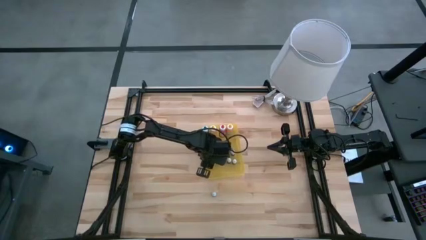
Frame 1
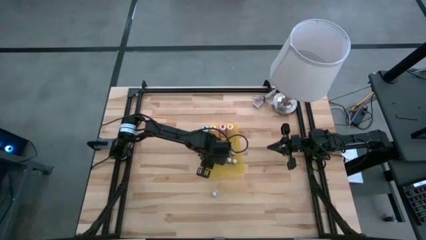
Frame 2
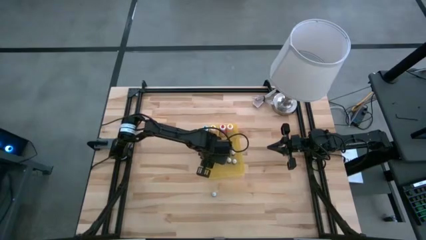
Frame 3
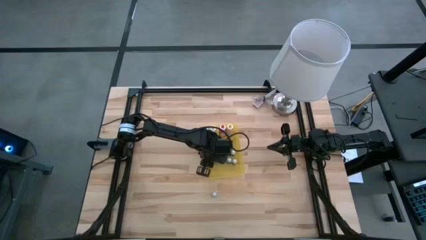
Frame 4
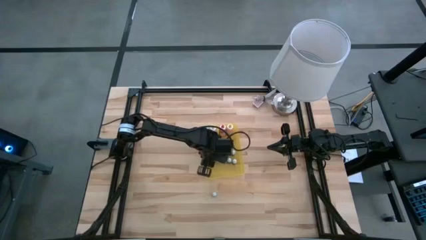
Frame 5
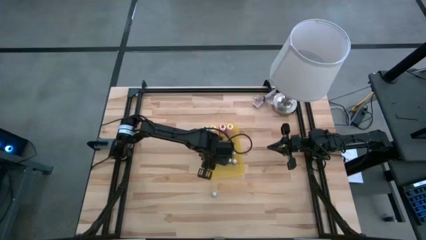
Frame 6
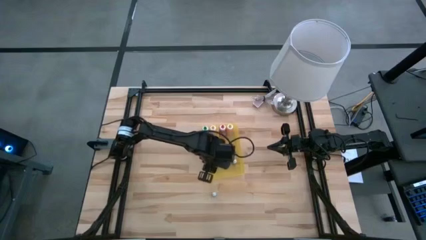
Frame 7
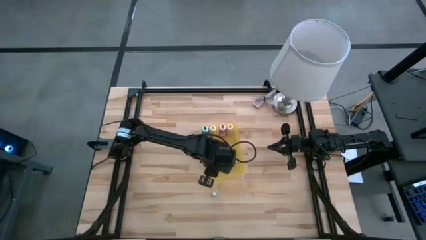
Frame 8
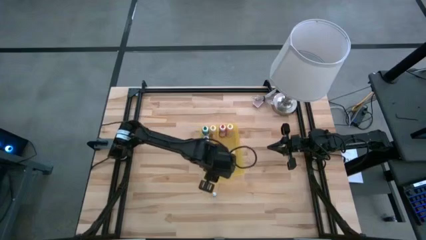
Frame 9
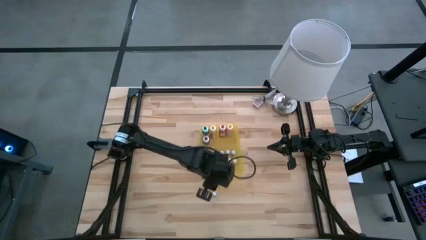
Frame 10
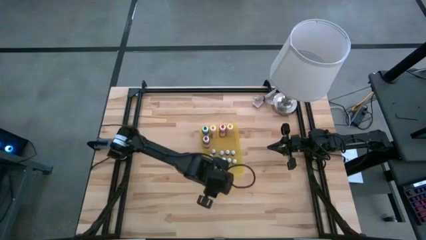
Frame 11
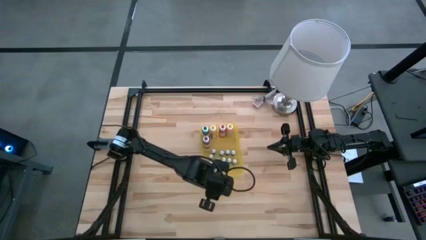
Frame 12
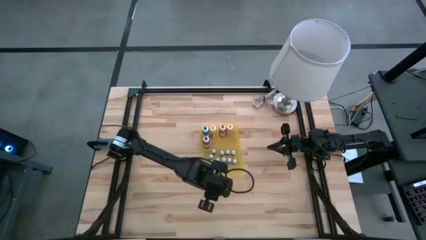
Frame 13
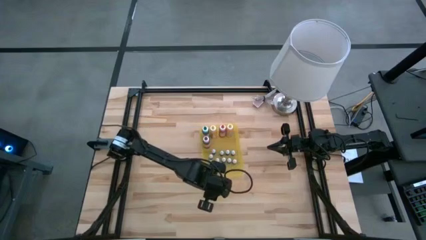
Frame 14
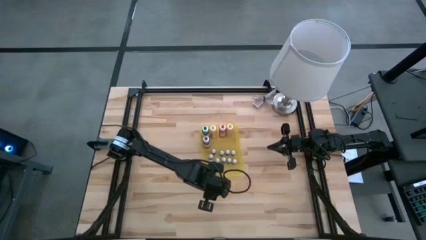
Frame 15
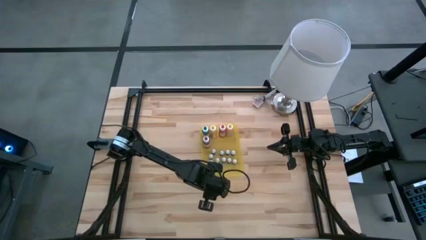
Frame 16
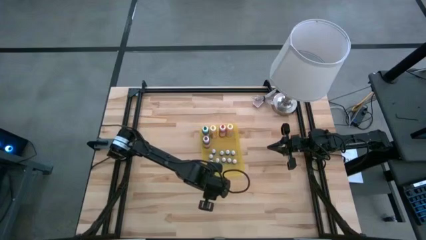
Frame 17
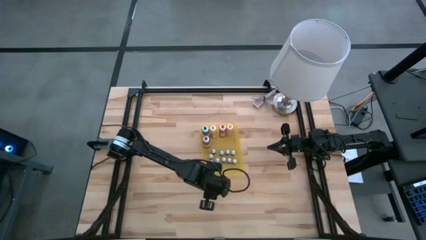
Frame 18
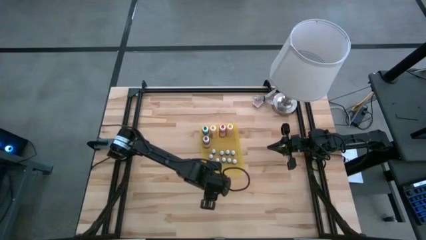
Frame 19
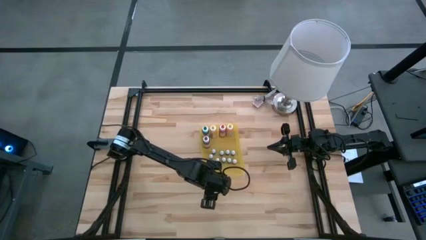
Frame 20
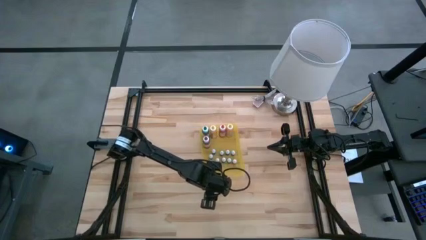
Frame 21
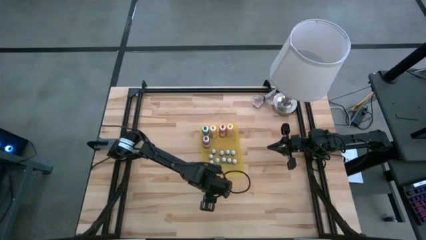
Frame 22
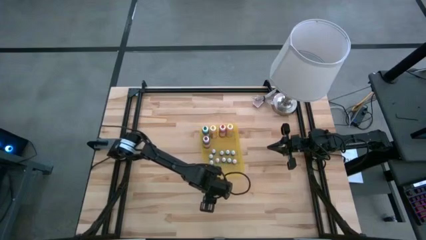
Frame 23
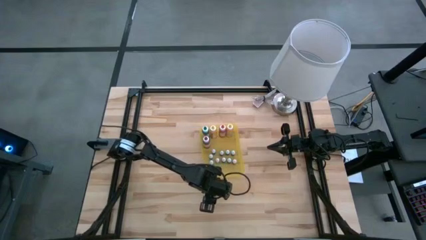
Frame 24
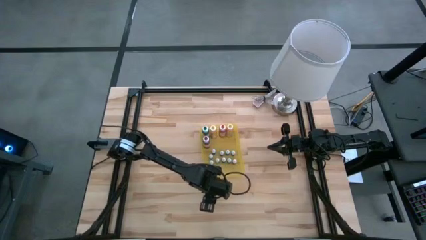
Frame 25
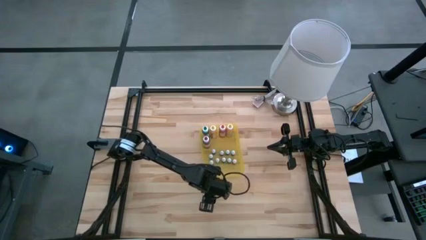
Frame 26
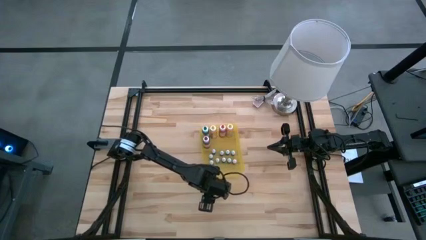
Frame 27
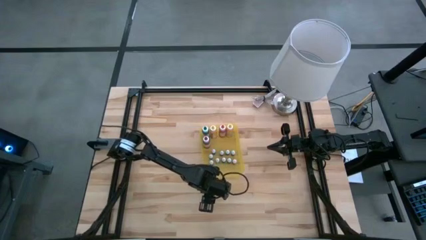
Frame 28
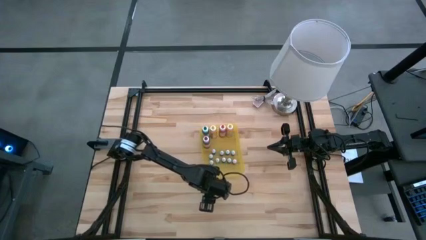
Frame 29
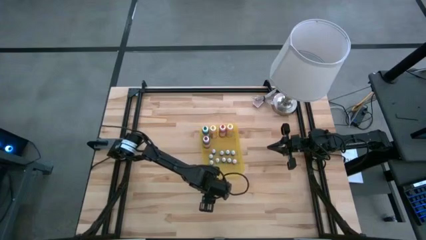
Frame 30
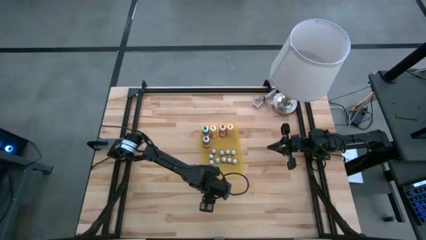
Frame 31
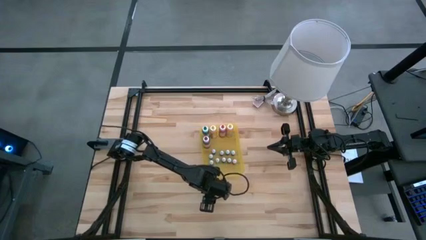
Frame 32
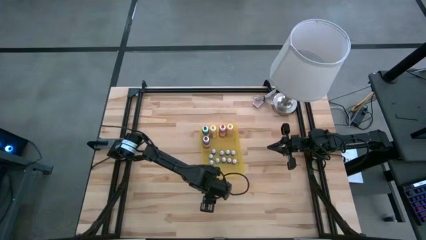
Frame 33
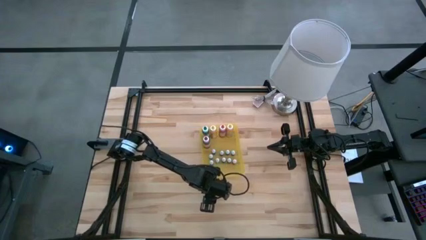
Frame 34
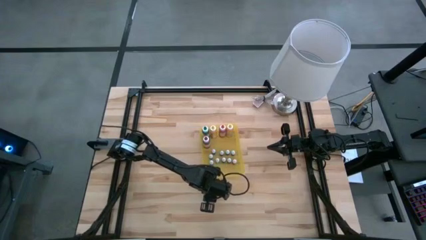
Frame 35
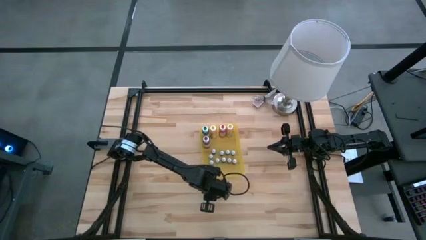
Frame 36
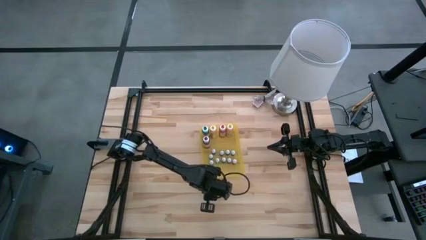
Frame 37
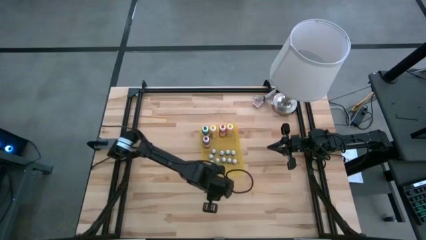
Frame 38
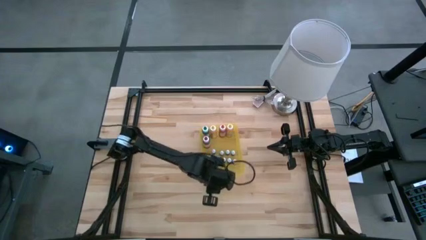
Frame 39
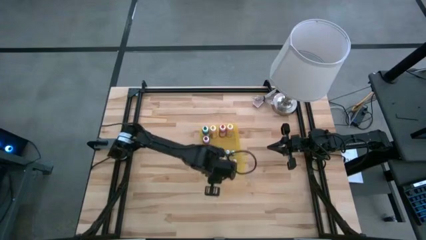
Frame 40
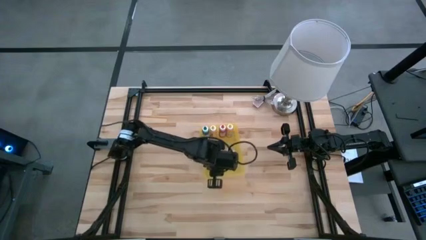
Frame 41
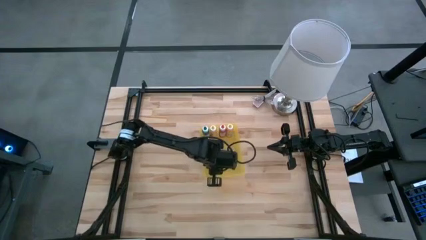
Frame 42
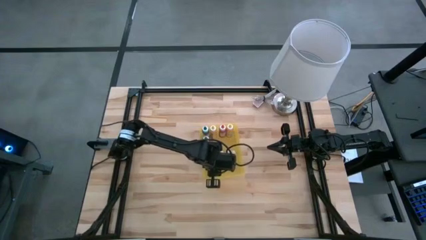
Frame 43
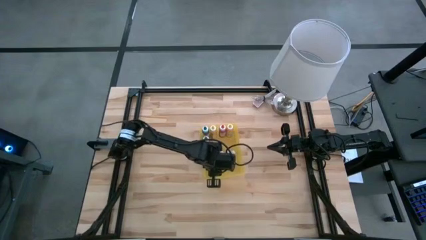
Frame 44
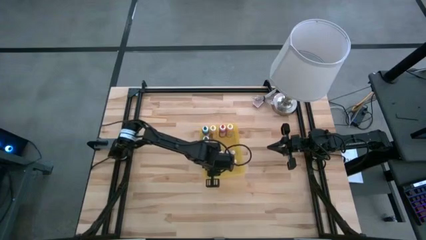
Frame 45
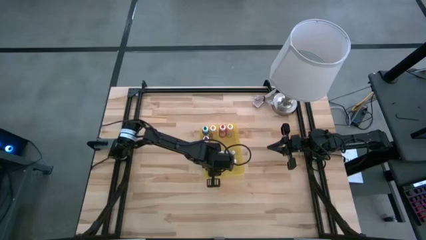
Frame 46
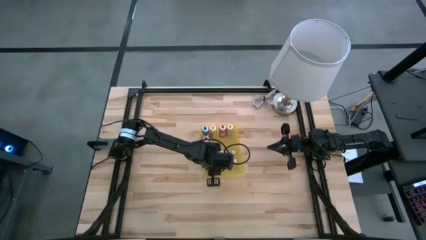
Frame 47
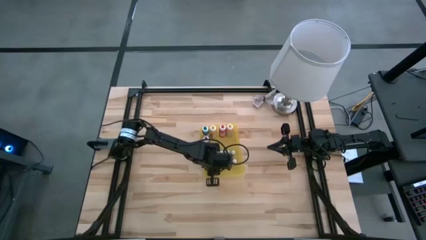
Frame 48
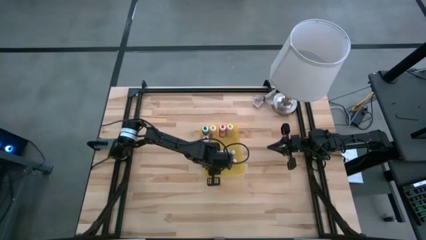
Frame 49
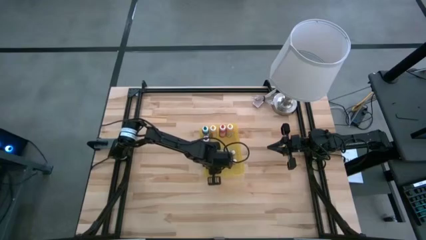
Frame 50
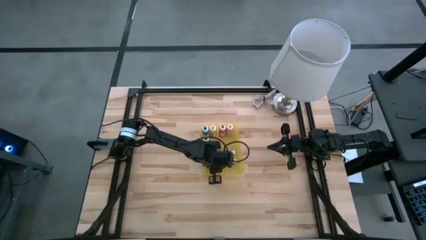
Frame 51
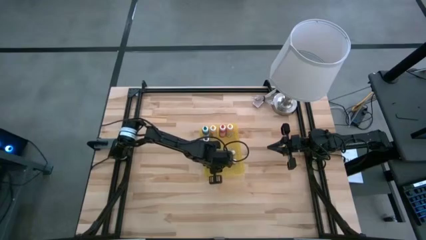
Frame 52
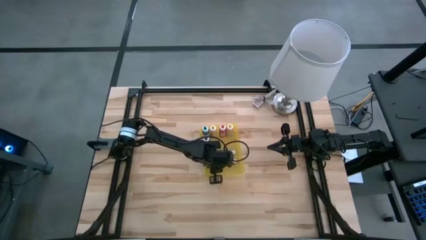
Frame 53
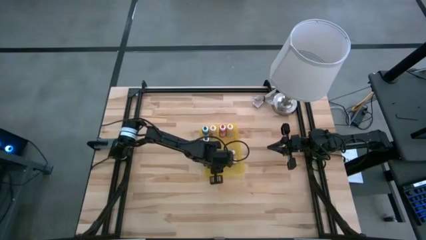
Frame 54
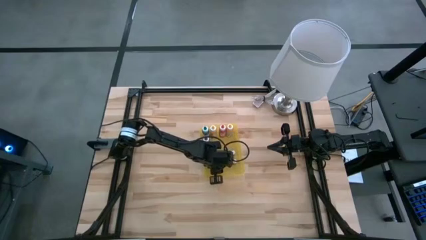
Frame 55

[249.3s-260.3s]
Task: Pick & Place food coloring
Put the small green food coloring bottle into the bin

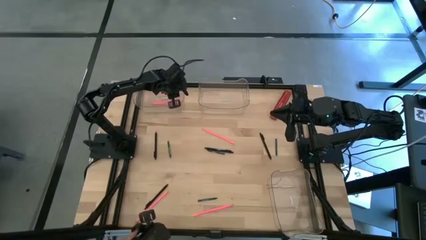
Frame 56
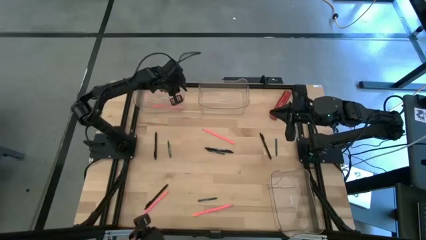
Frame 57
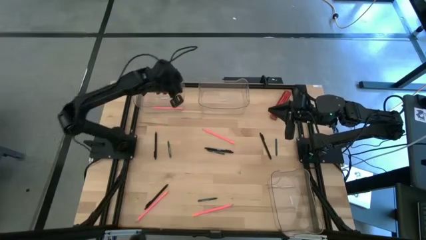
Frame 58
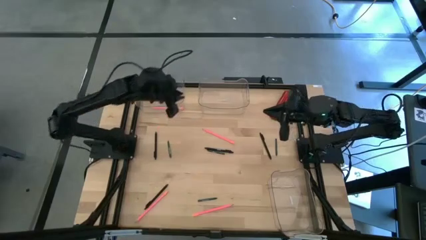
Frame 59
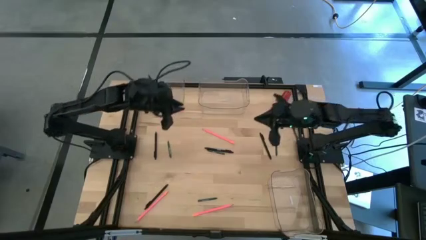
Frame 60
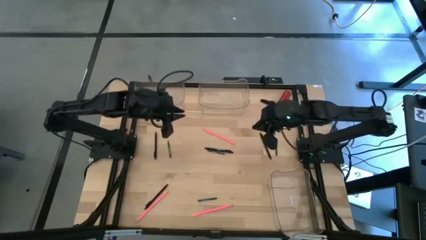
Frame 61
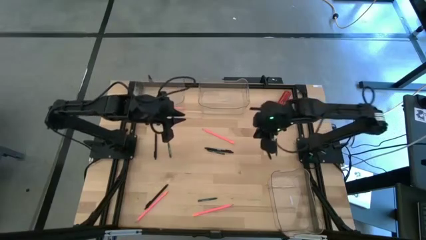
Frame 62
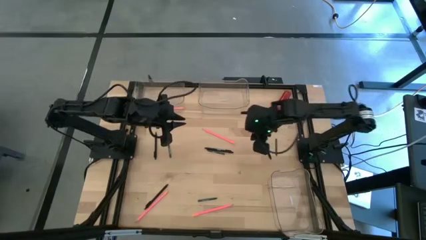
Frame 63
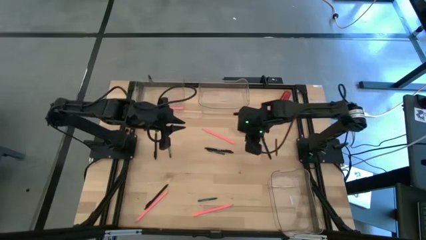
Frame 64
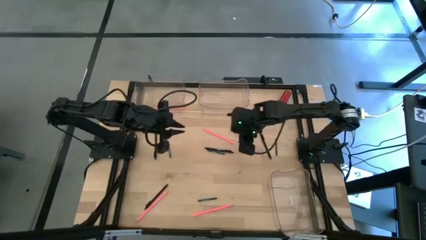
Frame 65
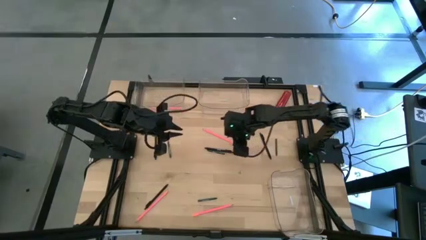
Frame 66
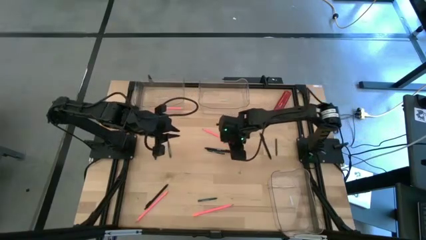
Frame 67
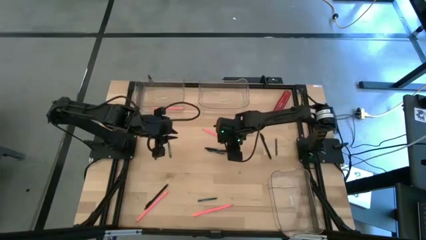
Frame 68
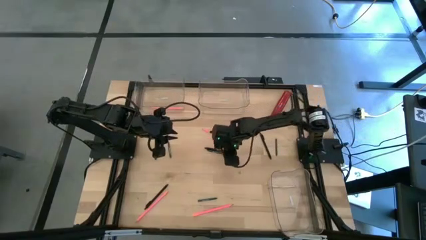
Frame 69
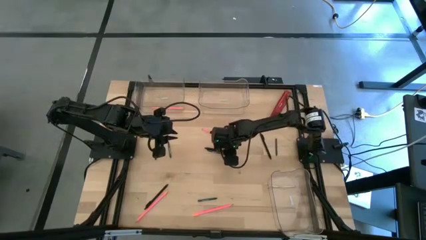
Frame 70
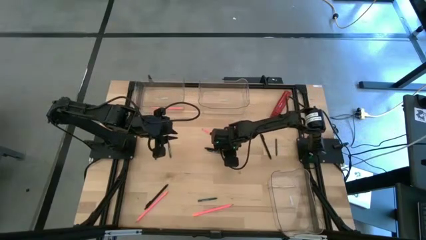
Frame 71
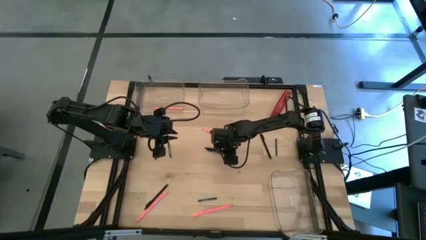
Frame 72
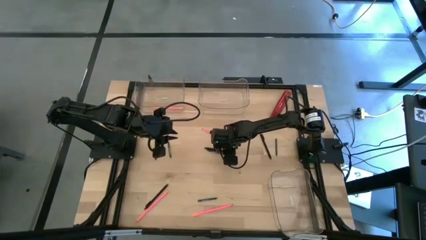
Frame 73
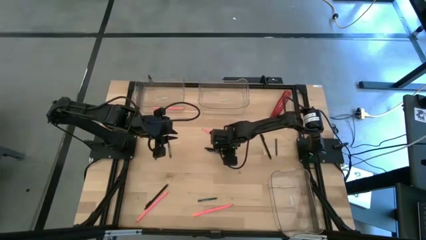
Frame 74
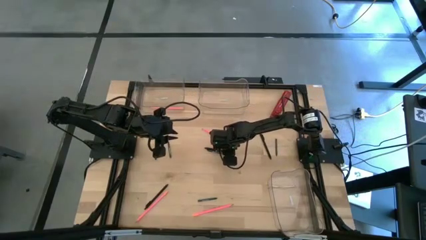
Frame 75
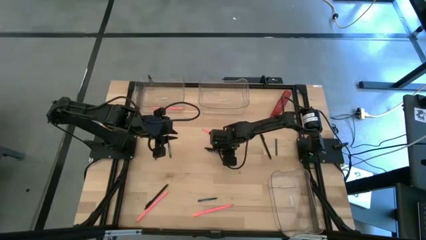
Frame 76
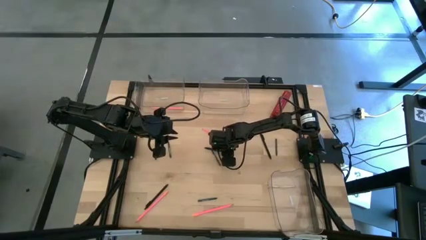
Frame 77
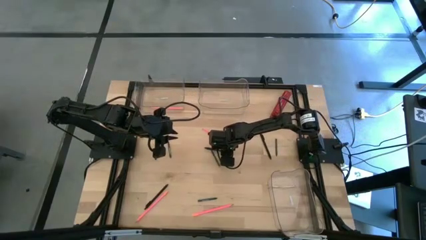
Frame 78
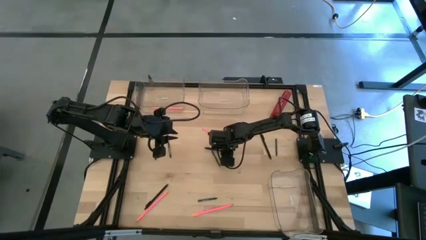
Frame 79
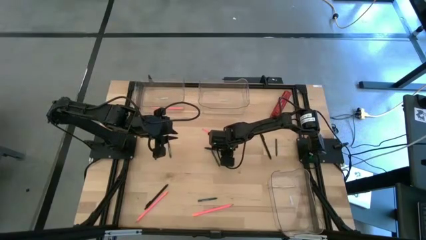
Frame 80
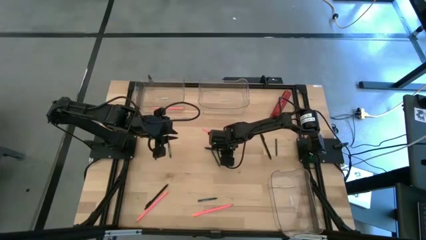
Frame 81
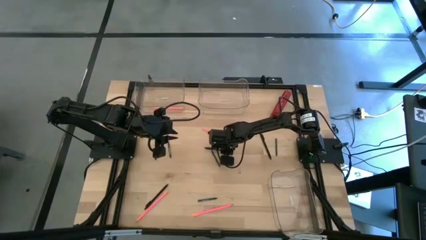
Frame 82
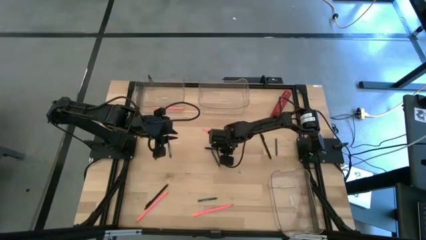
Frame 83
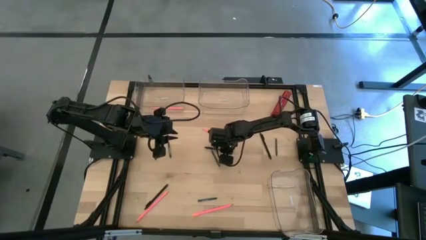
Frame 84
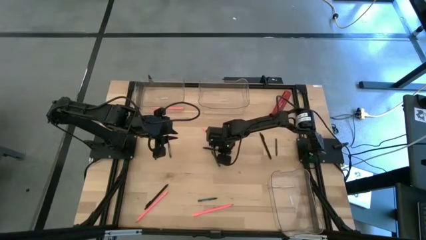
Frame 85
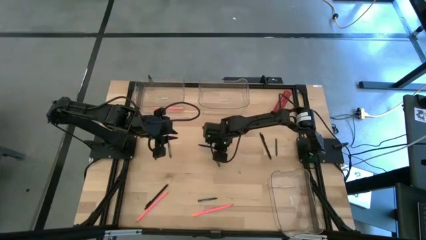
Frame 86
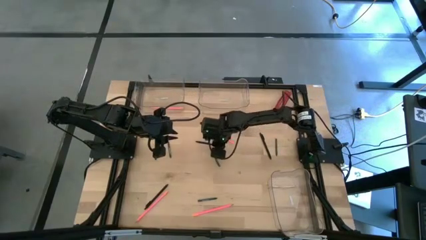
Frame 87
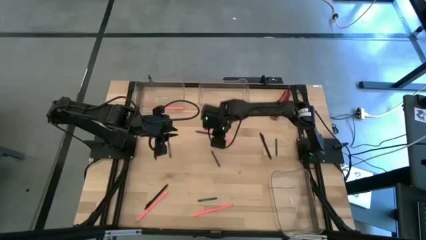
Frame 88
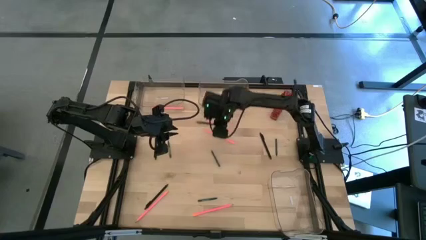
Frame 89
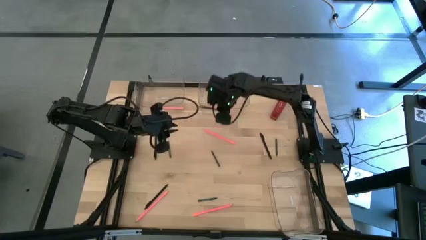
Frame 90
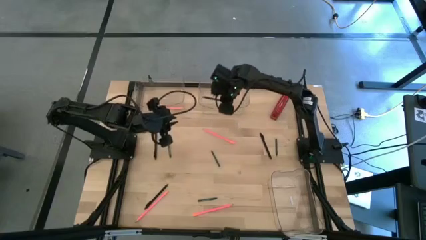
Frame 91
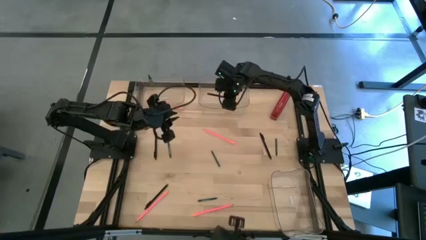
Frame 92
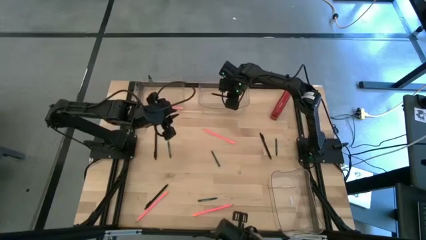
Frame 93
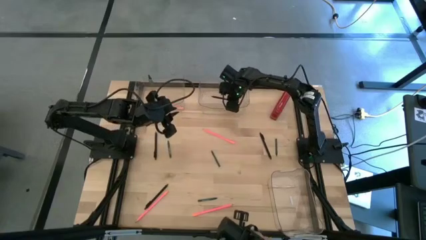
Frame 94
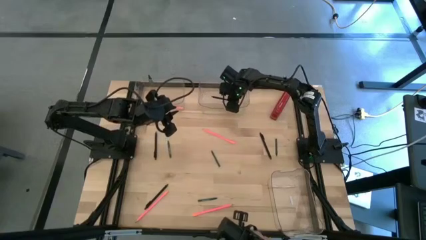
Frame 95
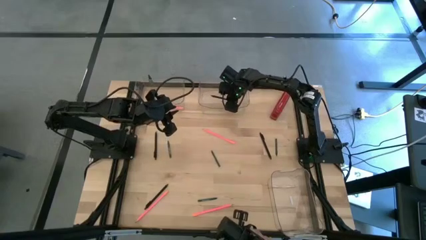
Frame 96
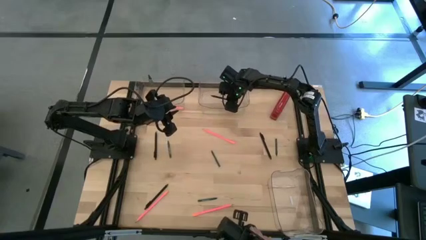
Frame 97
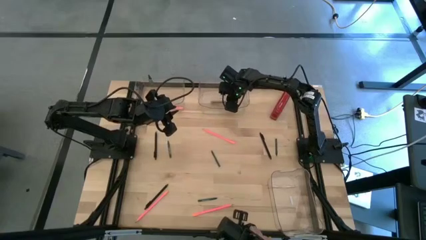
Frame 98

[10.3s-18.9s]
Task: Sort crayons/erasers/pens/pencils in bins
Put the pen into the top right transparent bin
